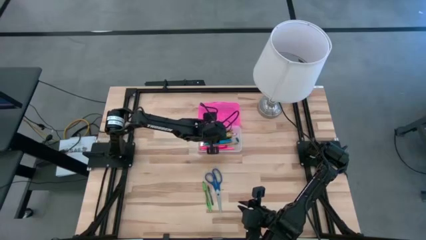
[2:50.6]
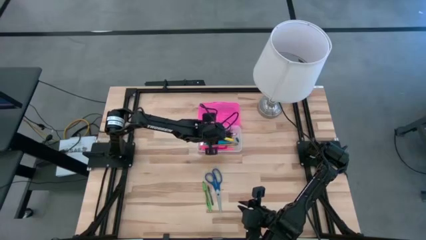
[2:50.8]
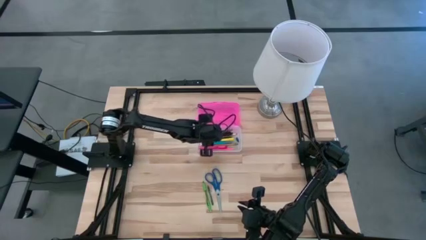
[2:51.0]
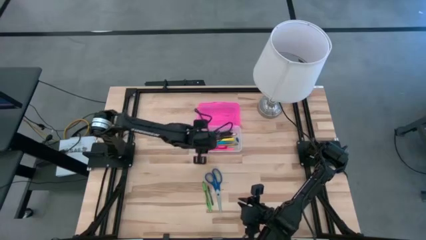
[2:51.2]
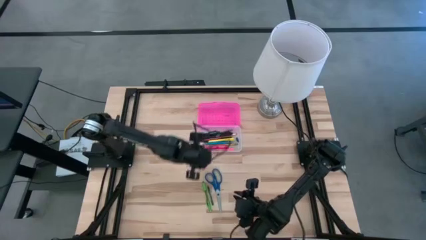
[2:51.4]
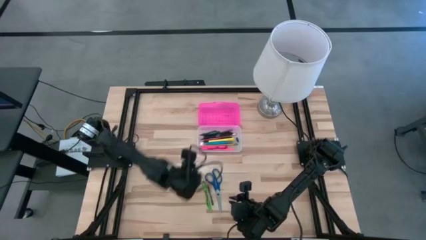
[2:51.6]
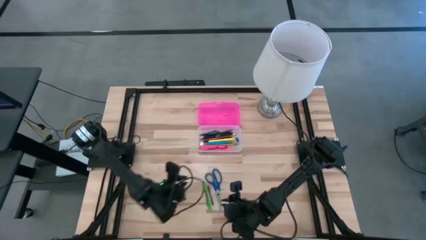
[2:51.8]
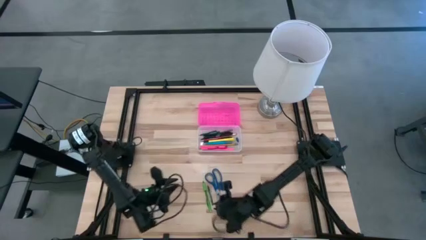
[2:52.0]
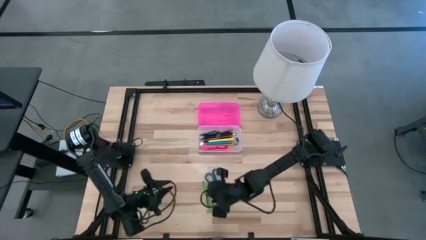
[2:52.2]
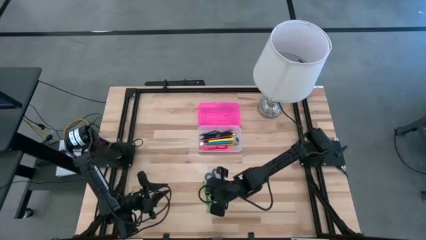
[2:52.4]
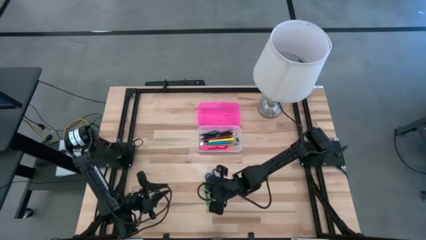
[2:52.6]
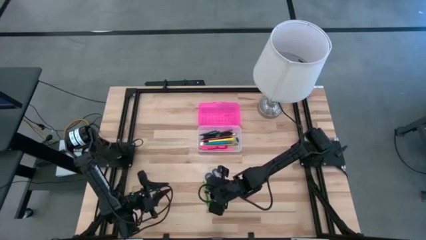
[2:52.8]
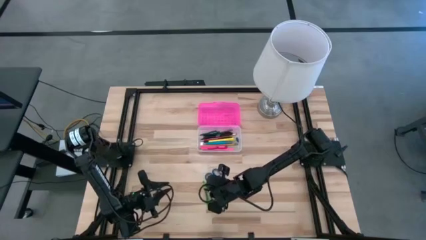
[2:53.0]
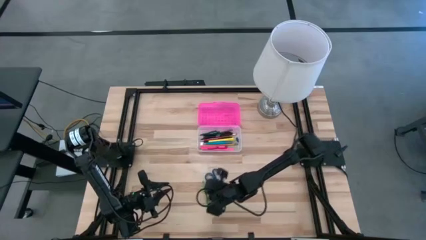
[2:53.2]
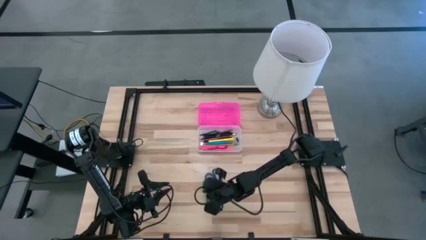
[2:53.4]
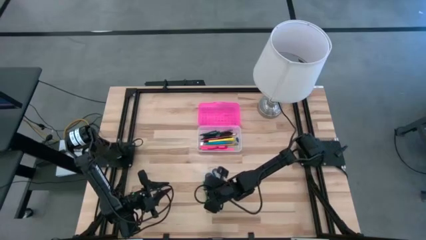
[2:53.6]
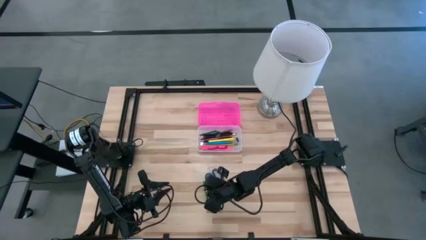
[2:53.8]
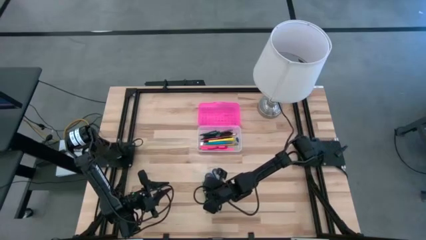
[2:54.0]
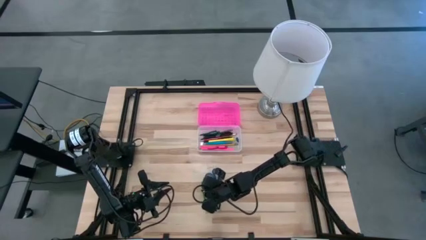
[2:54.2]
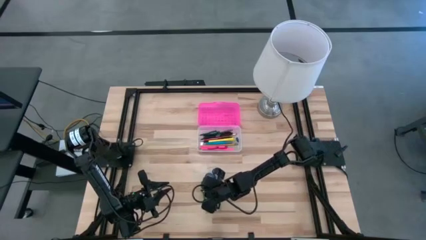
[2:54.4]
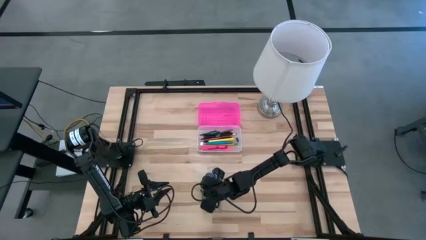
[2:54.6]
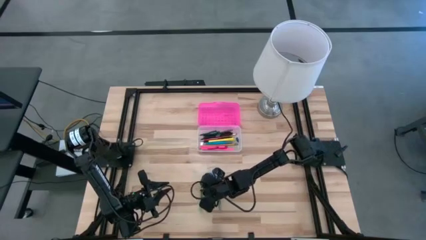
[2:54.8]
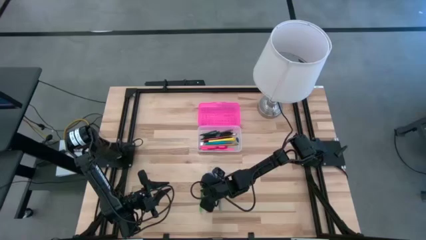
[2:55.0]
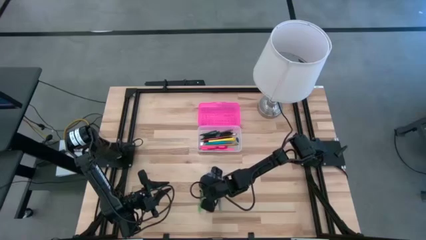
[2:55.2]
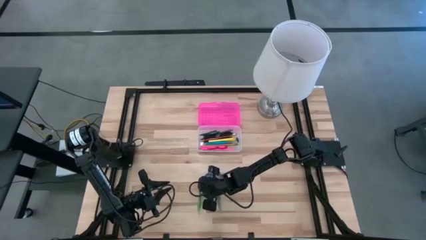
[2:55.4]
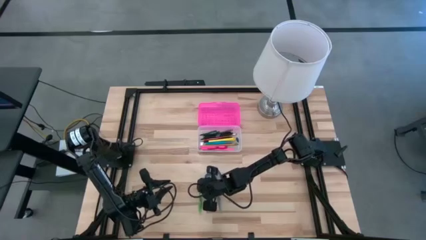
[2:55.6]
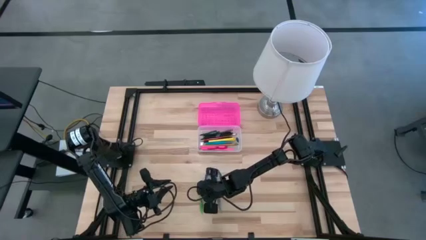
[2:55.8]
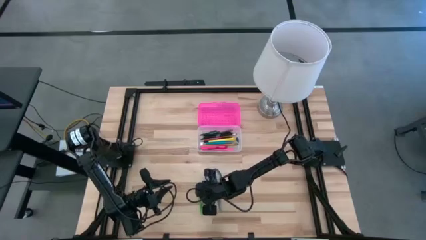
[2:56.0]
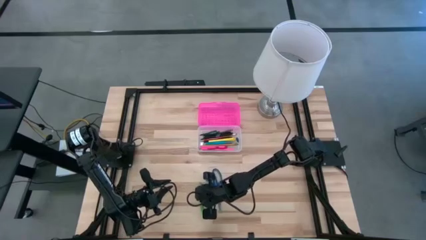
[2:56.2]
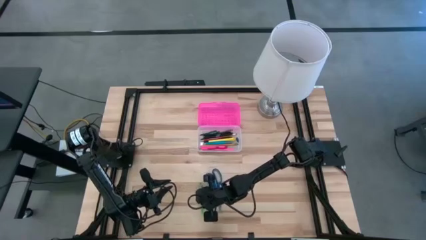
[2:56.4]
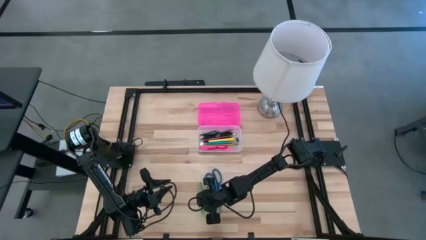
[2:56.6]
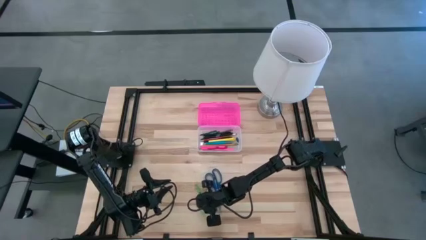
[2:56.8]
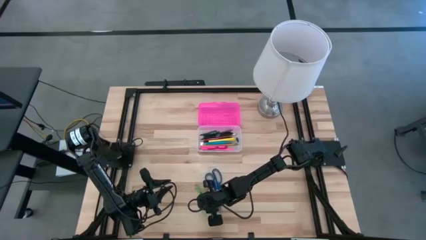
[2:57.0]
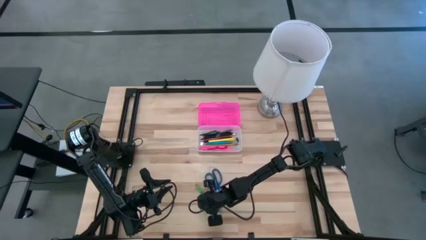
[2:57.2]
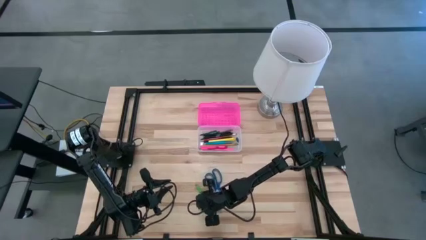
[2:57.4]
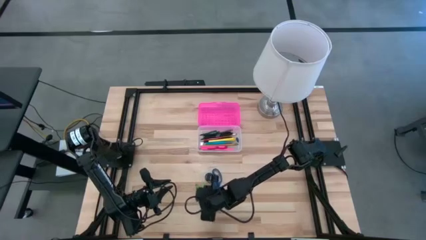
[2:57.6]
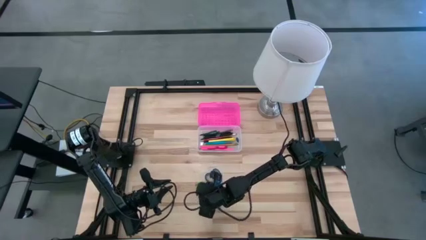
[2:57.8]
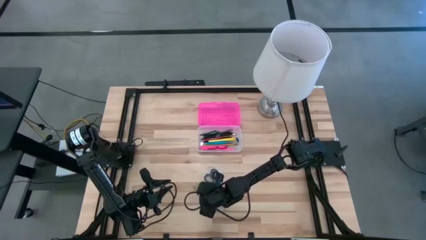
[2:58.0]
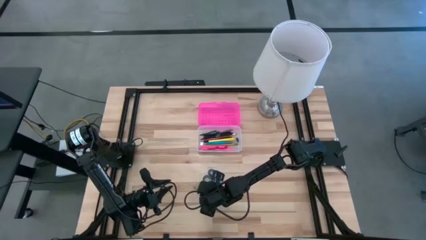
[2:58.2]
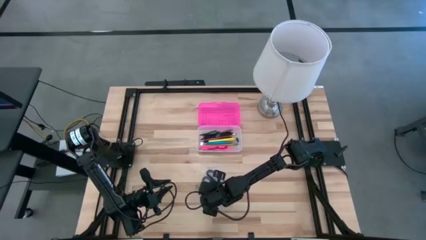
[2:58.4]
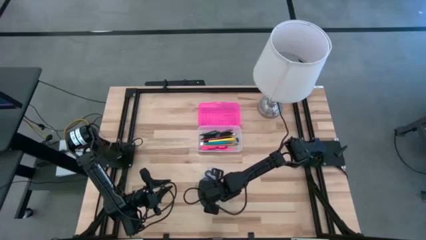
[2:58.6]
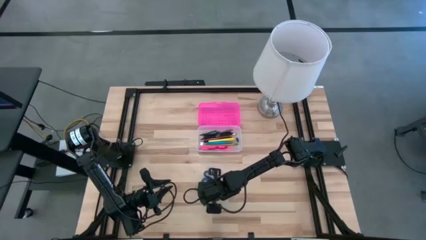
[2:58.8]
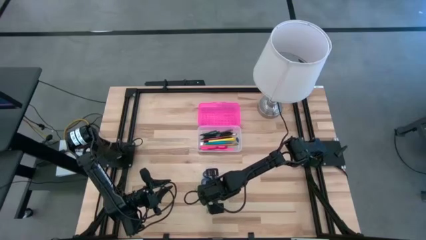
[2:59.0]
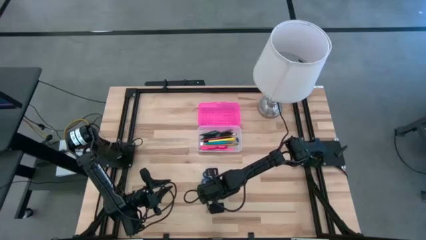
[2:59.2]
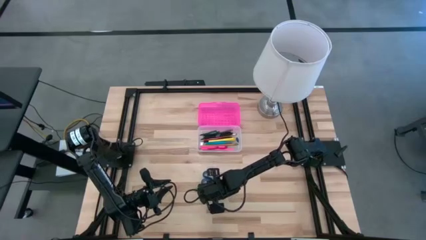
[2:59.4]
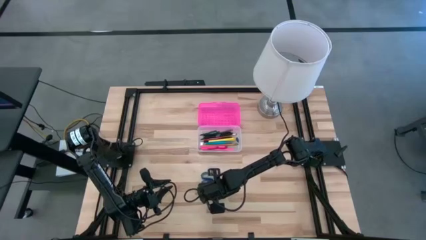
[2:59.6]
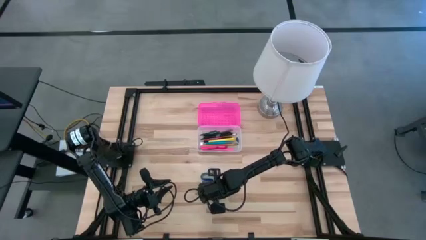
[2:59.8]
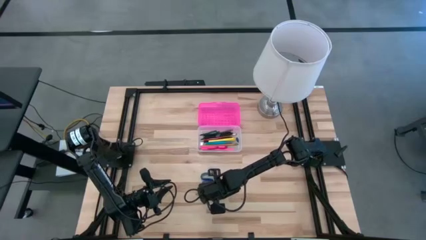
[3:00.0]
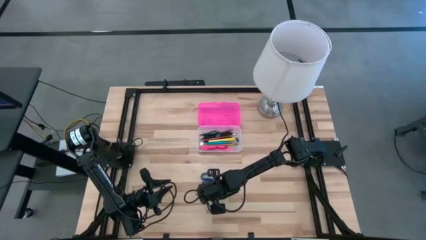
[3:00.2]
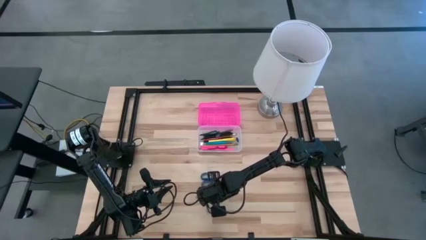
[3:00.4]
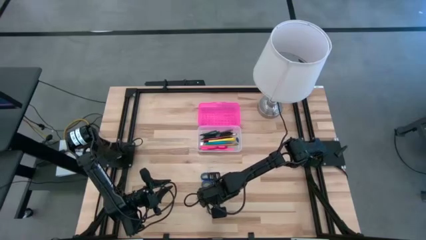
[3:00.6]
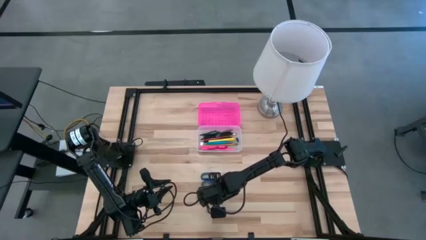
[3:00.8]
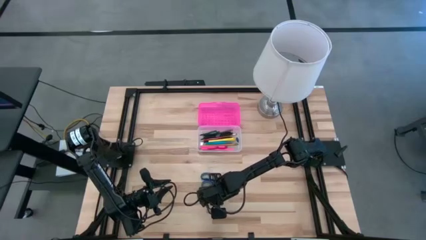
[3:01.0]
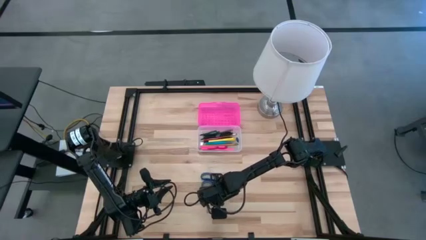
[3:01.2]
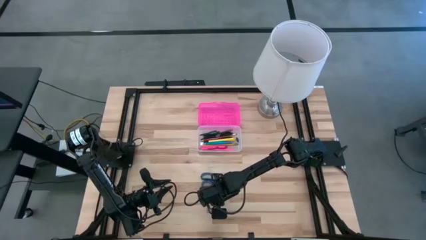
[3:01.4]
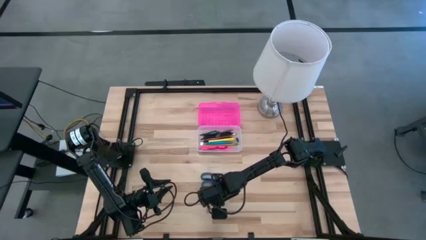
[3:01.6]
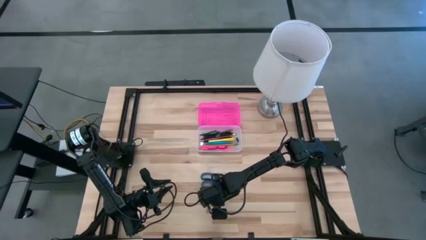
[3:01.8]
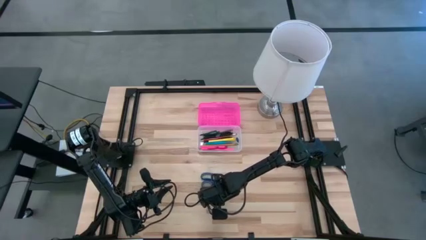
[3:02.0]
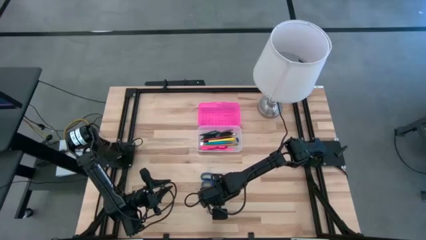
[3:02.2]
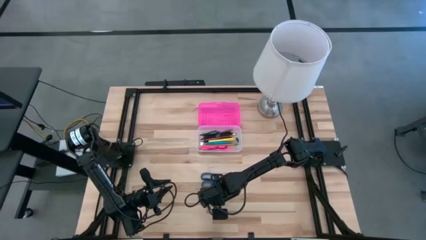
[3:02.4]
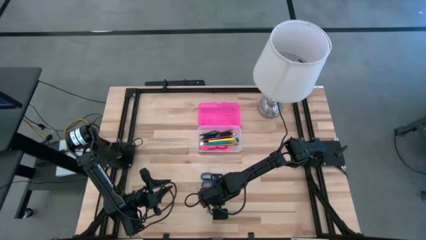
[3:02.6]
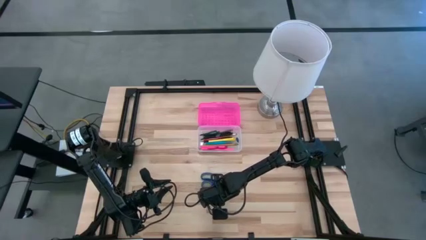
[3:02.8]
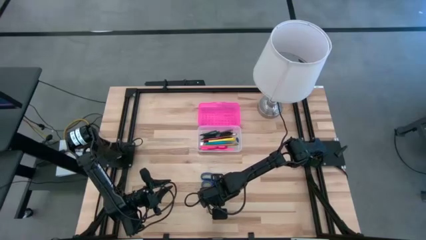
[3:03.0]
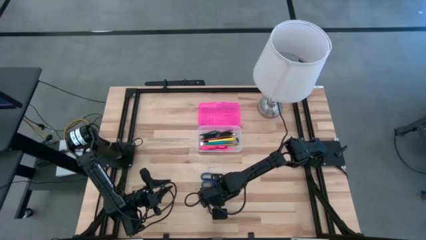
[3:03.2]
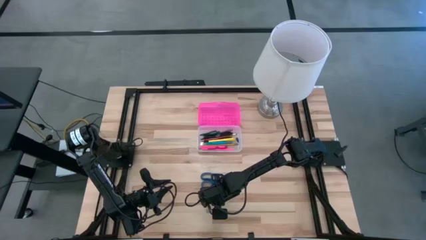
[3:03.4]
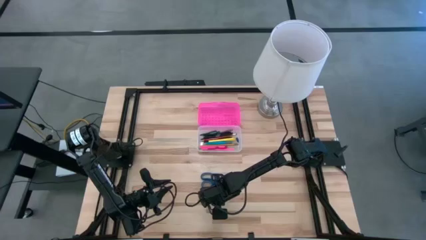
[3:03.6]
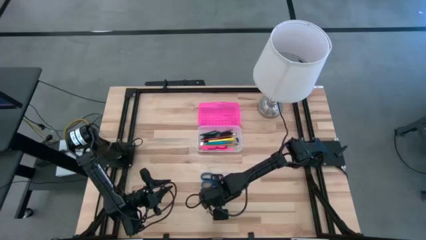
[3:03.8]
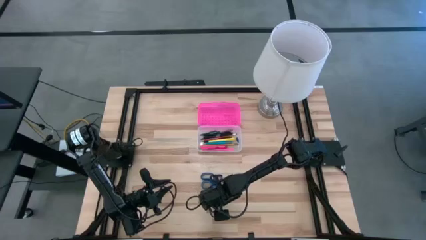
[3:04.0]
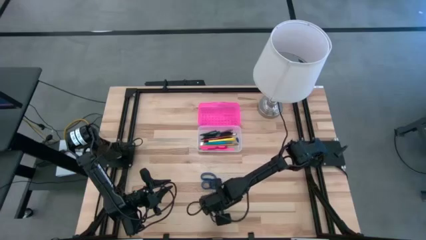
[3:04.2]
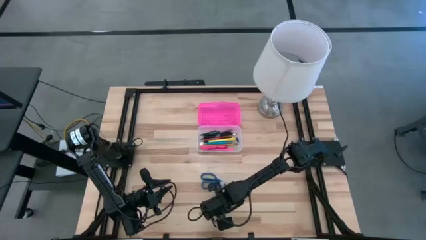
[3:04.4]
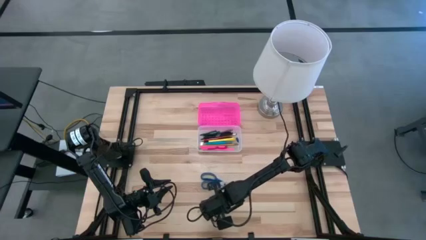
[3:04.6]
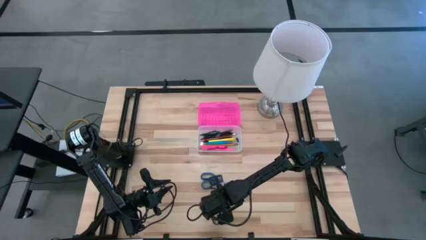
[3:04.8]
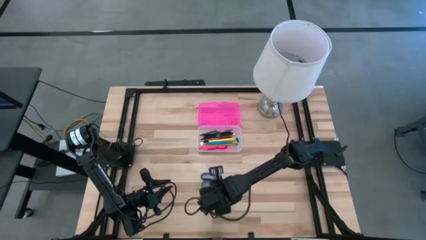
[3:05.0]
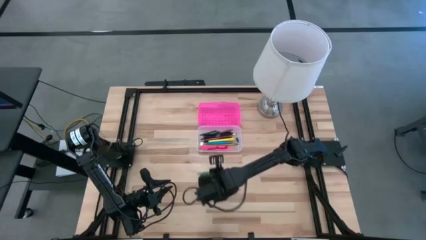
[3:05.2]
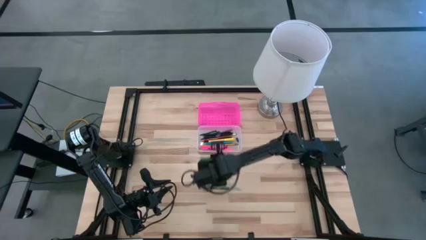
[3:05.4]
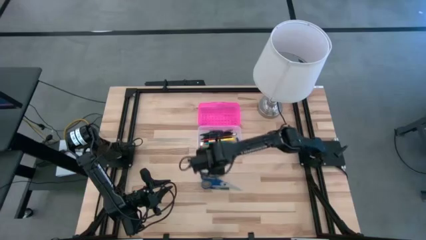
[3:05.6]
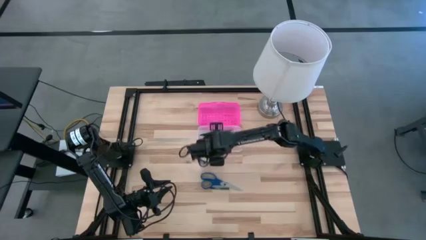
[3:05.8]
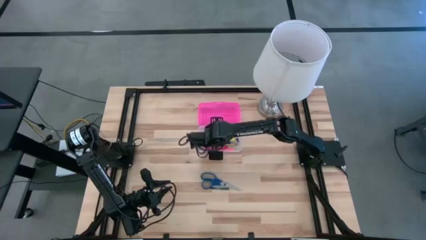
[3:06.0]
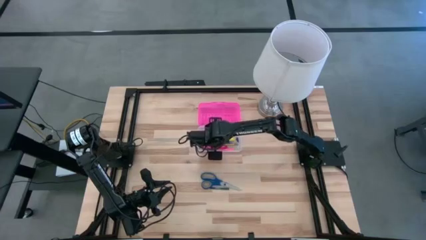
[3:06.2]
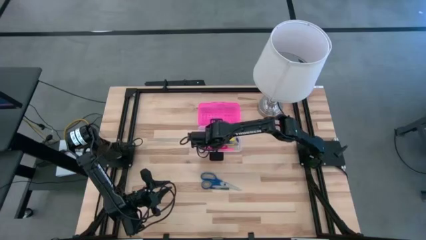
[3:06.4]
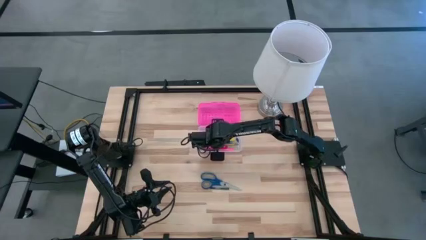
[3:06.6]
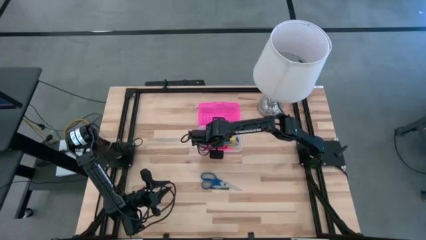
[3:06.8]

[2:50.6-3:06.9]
Task: Pick & place school supplies into a supply box
Put the green pen into the supply box

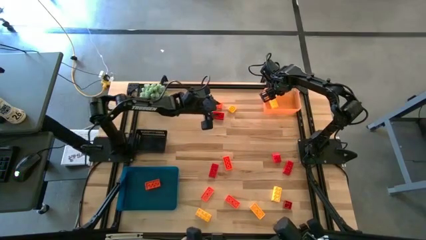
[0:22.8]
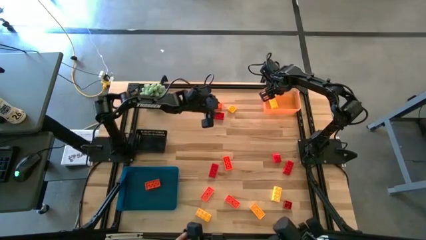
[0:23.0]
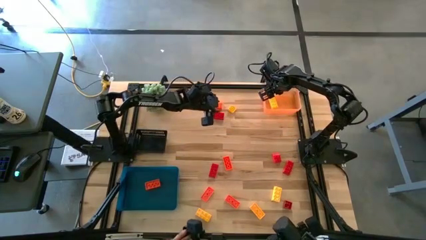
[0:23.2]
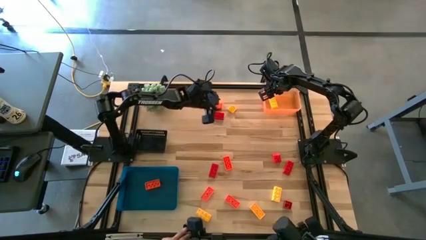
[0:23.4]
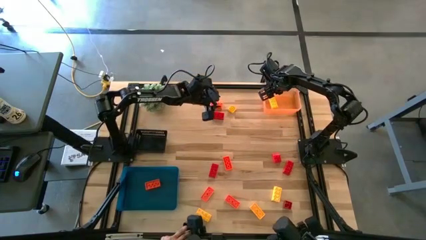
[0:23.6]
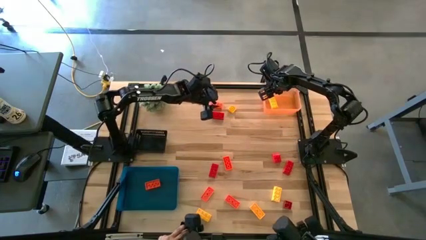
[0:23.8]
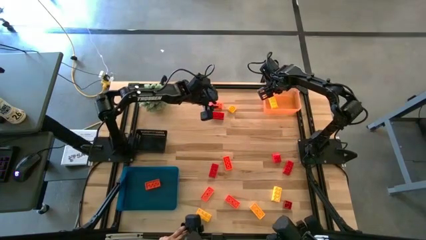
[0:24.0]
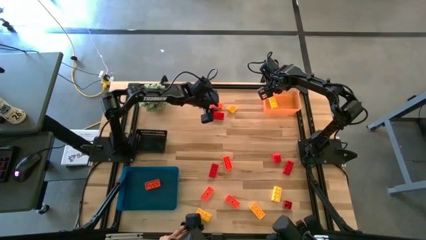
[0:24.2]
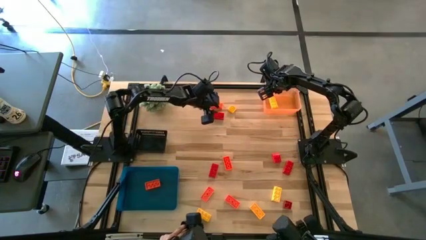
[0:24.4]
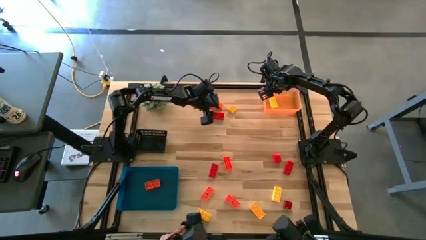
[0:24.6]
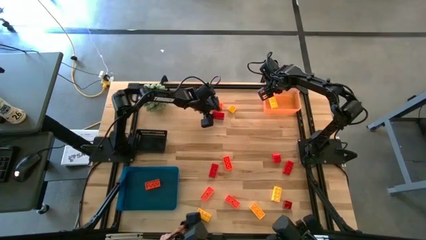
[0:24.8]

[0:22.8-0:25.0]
Task: Sort & place blocks by color
Put the red game piece into the black bin
